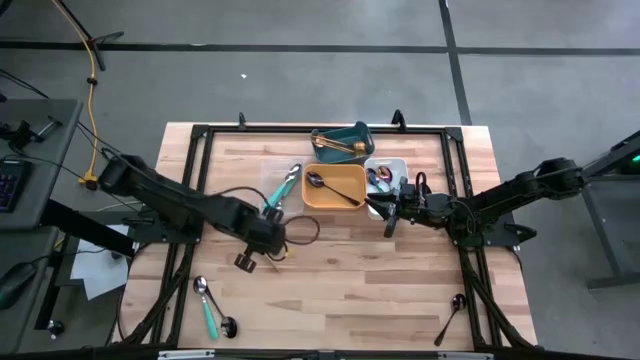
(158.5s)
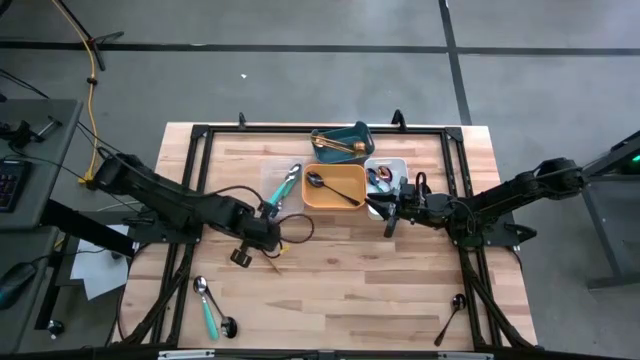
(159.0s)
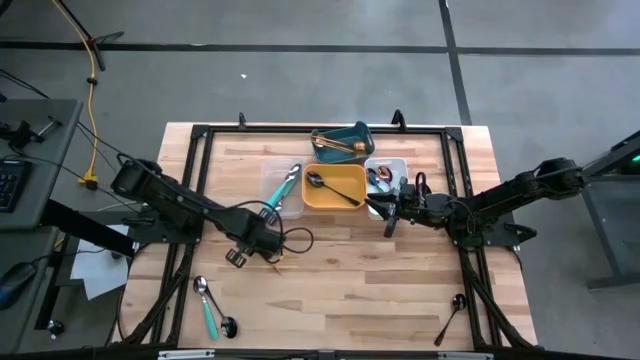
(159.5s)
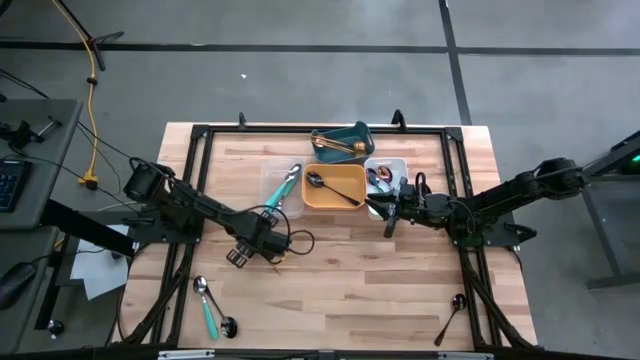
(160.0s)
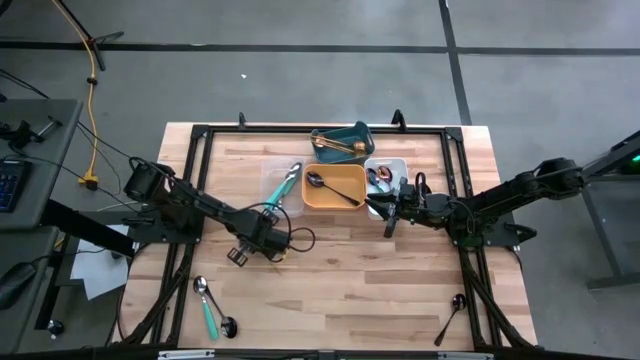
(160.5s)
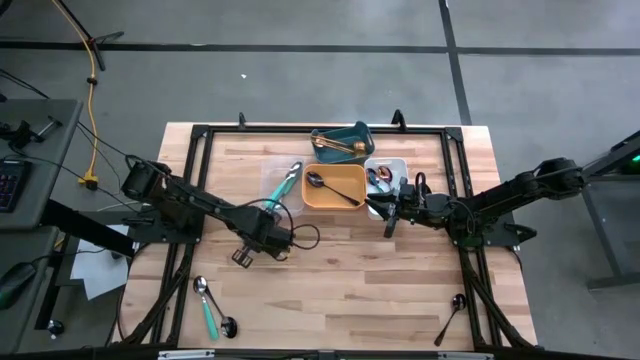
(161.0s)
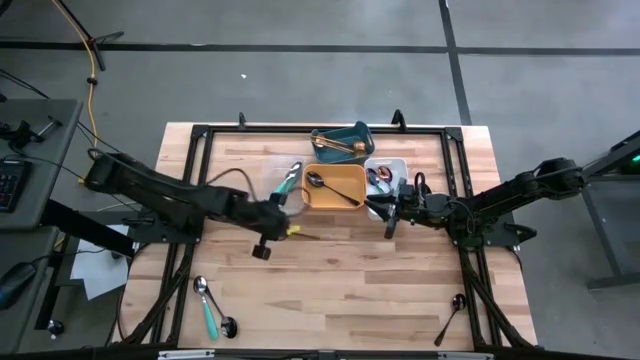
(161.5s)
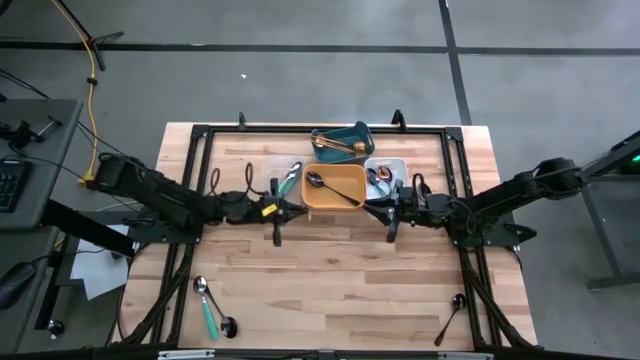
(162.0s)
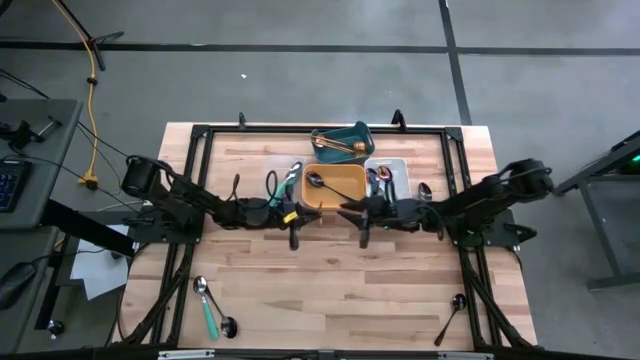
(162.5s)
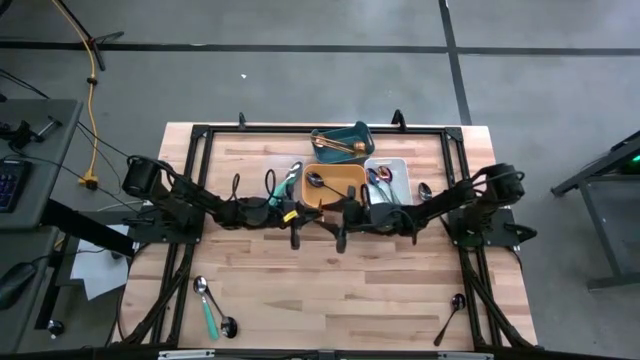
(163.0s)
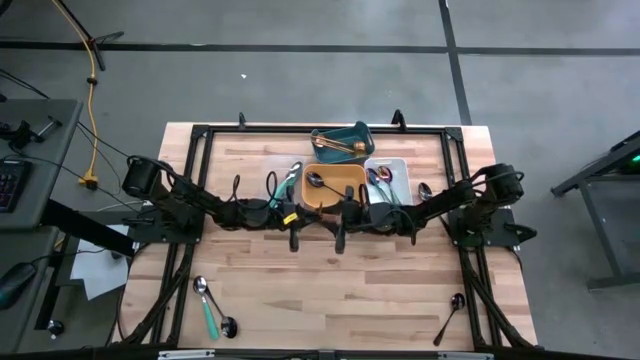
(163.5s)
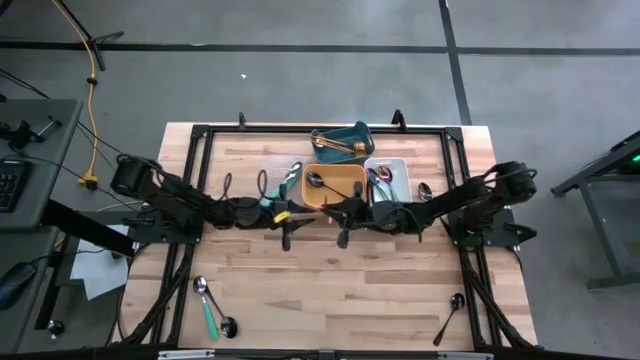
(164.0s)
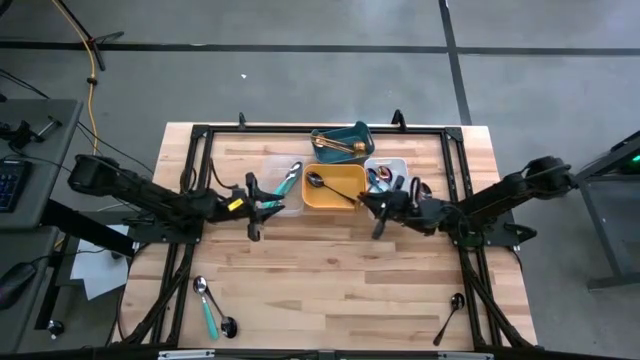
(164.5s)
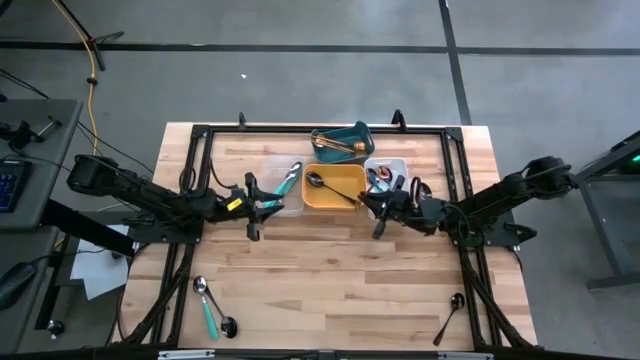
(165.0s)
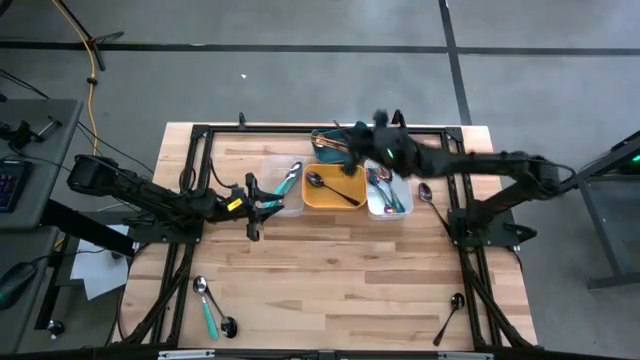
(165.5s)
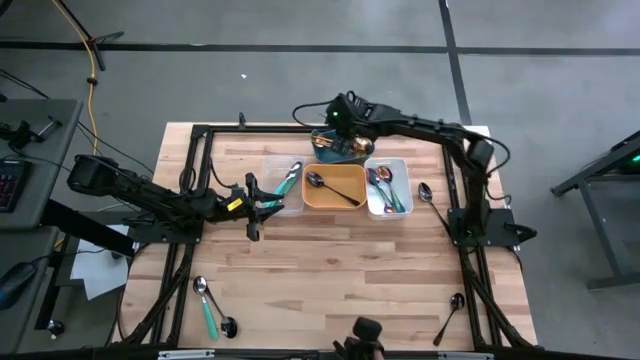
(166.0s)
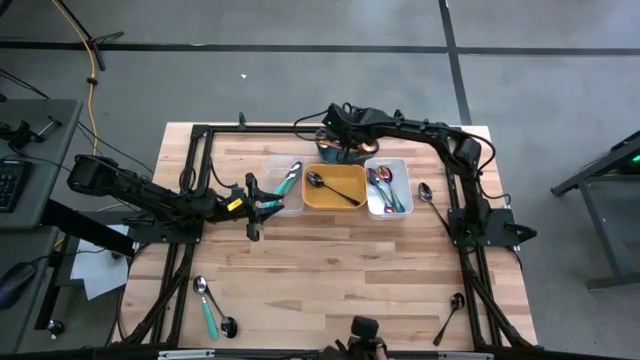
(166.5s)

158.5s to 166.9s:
Task: Sort silverware by color (type)
Put the gold-colored spoon into the green bin

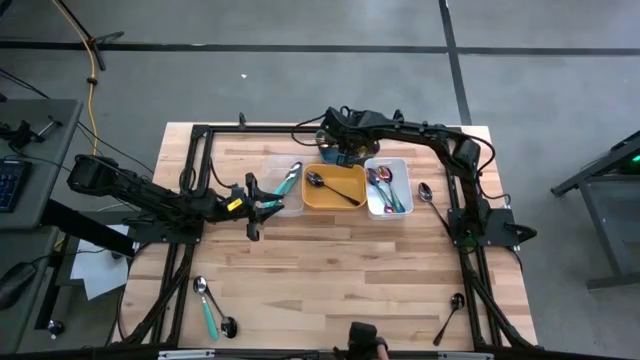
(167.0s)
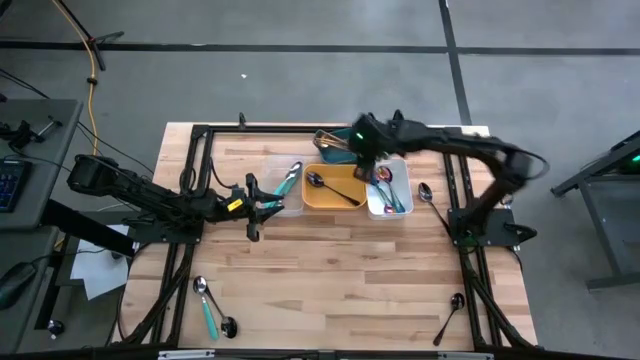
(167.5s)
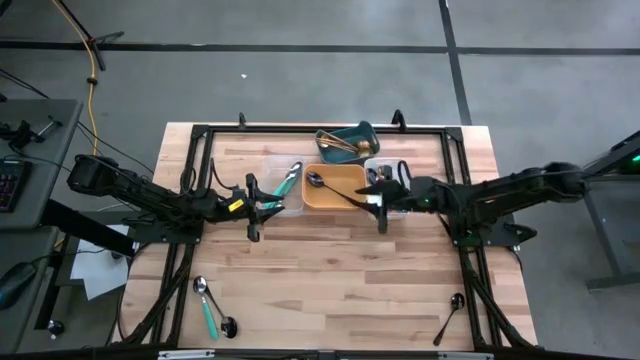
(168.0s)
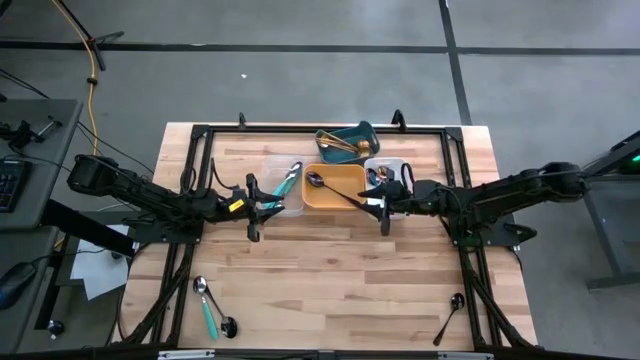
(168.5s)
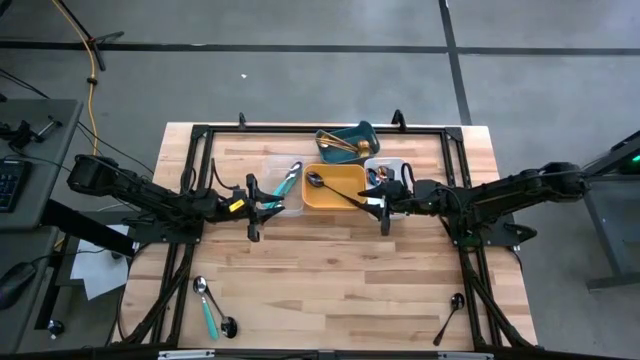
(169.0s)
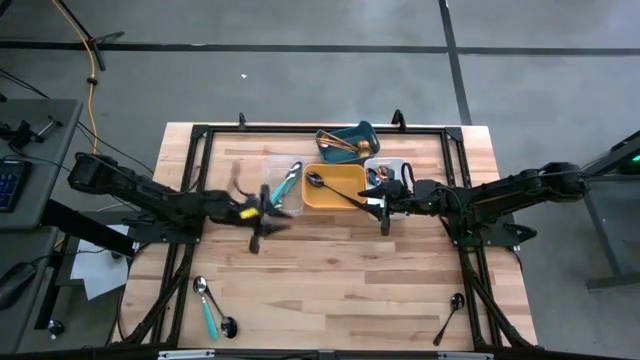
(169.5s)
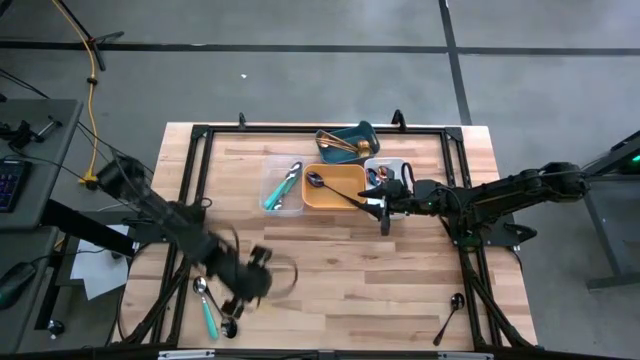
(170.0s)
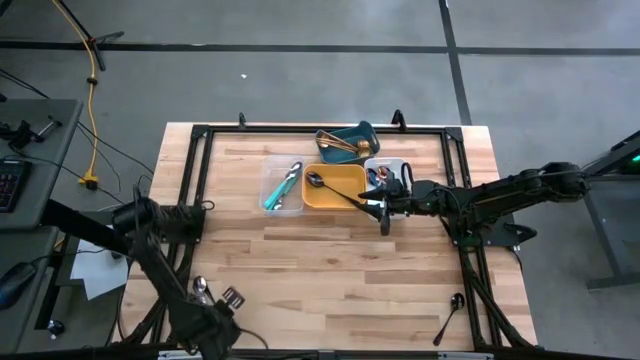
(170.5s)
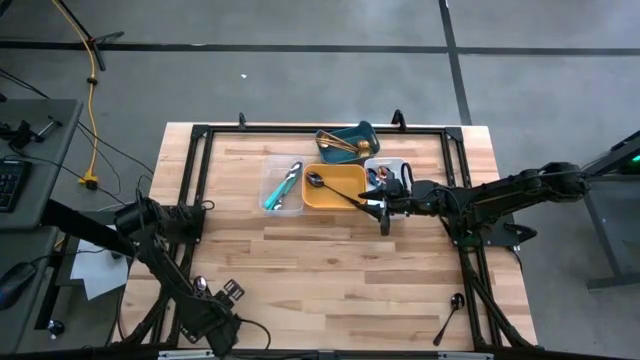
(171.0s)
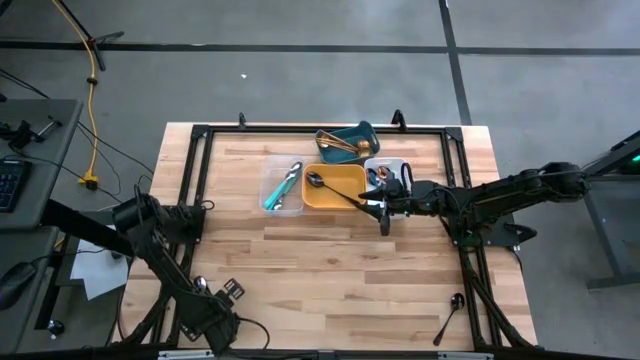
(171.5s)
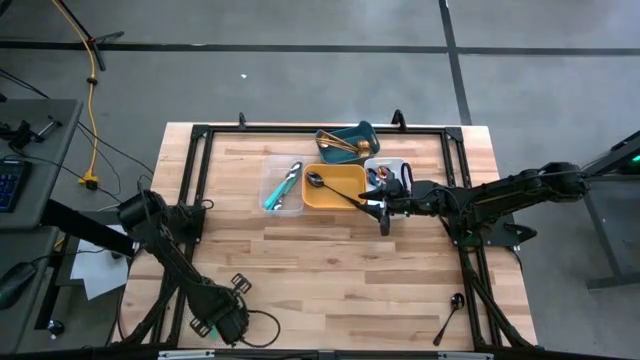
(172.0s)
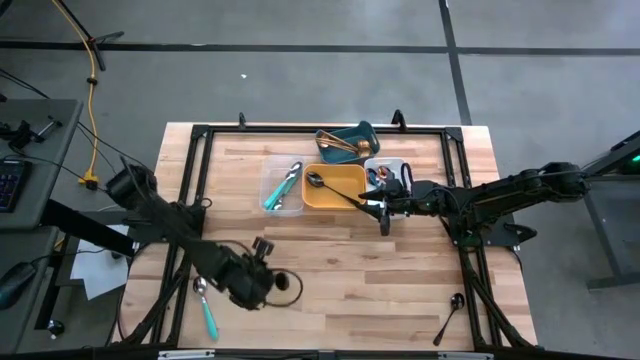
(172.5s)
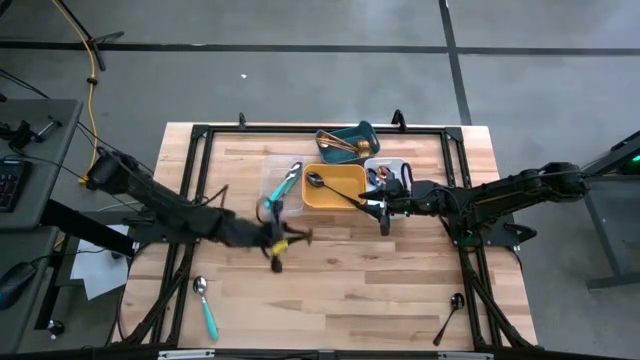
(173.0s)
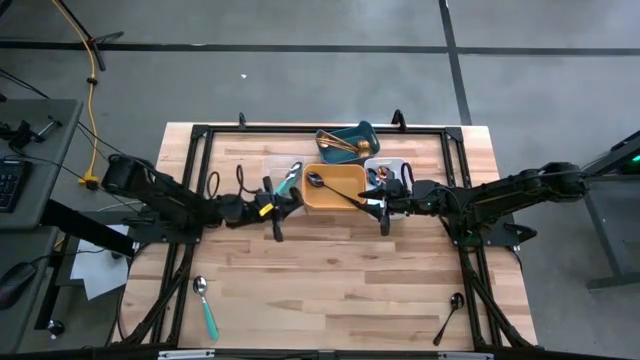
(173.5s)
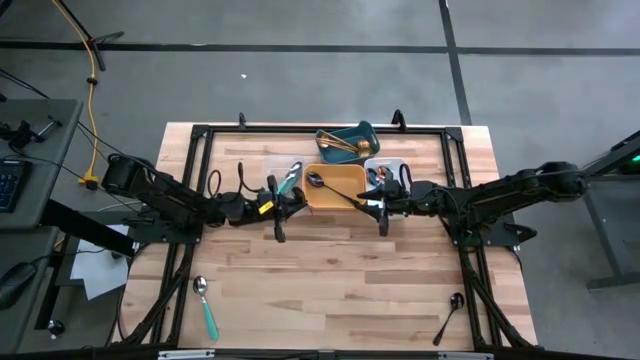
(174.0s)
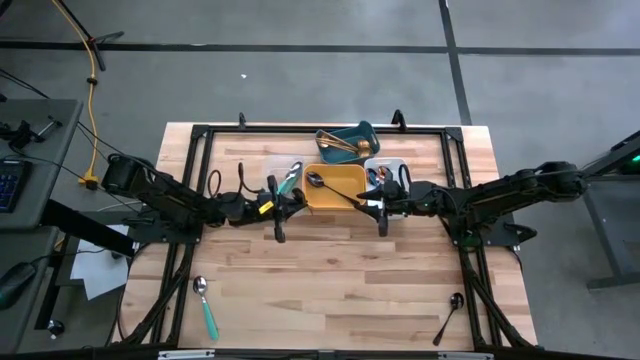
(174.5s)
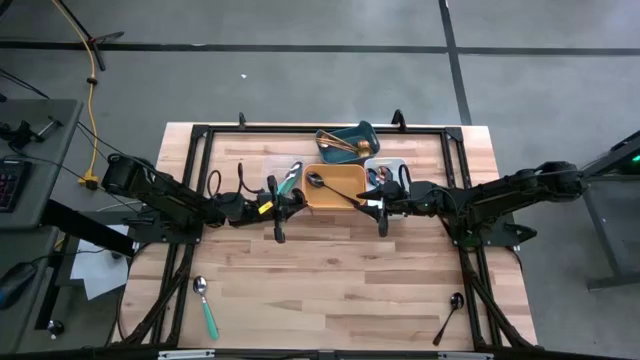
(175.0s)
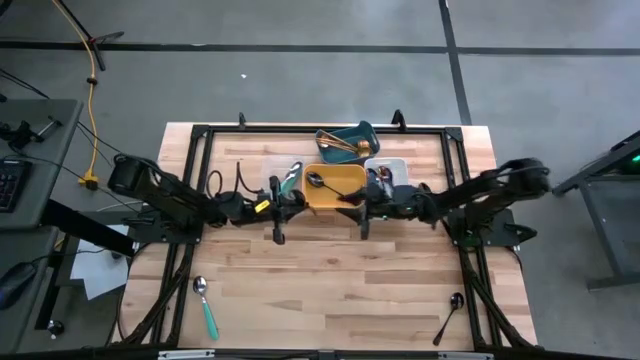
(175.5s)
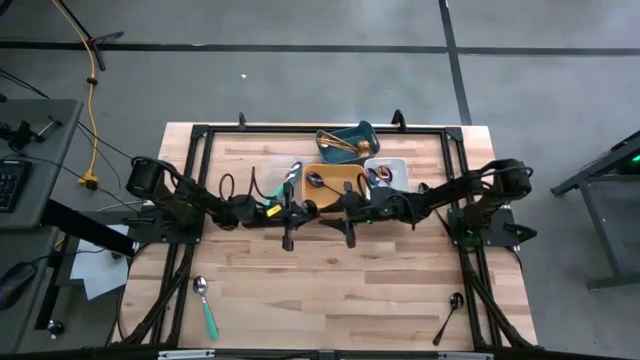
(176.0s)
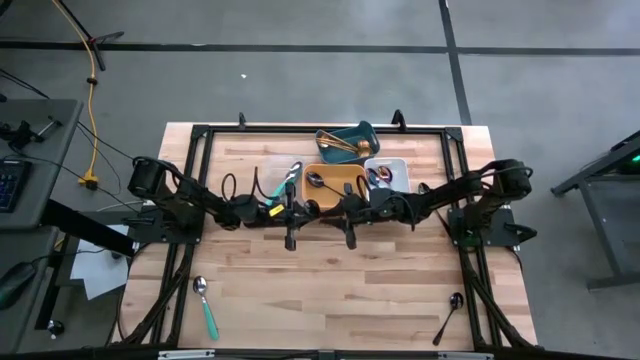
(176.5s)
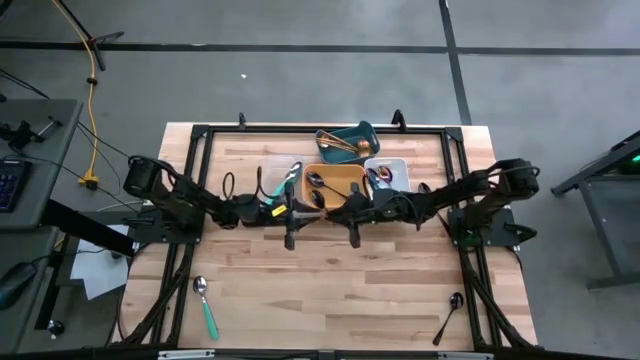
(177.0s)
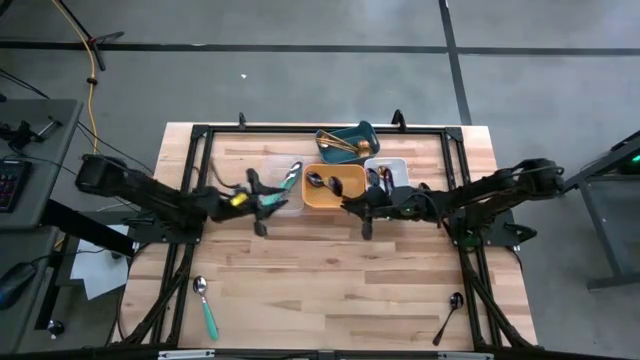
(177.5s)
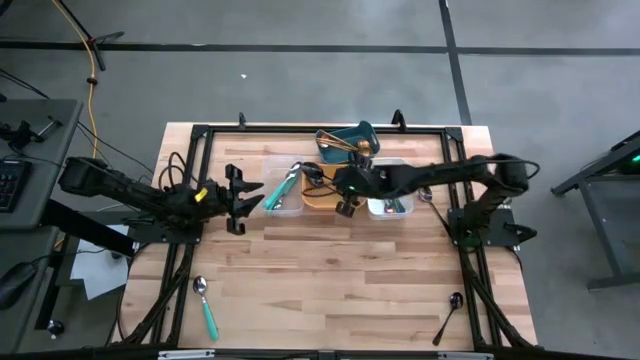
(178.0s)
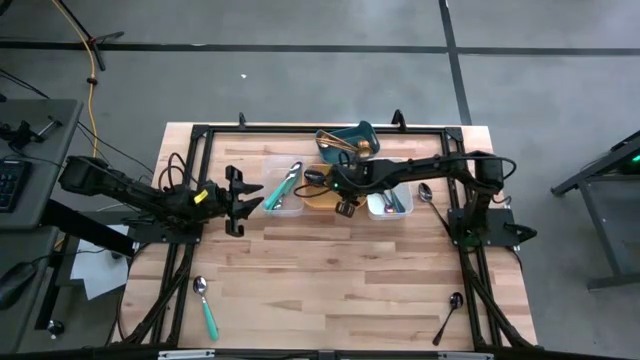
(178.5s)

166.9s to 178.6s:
Put the silver spoon into the orange bin
